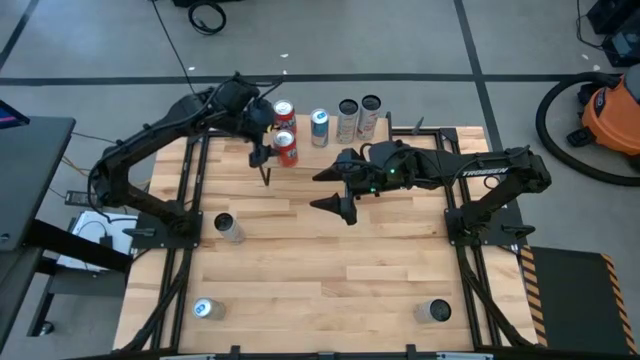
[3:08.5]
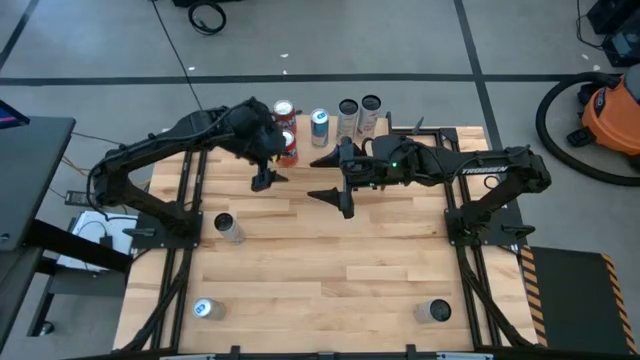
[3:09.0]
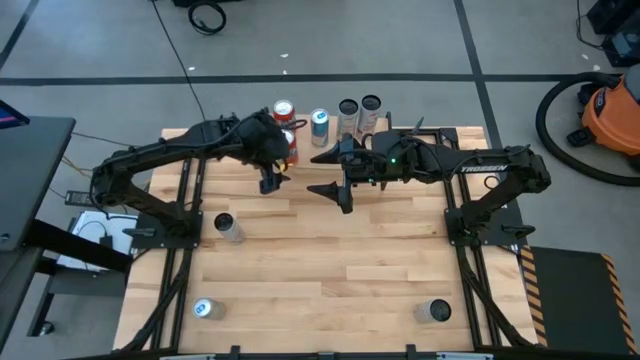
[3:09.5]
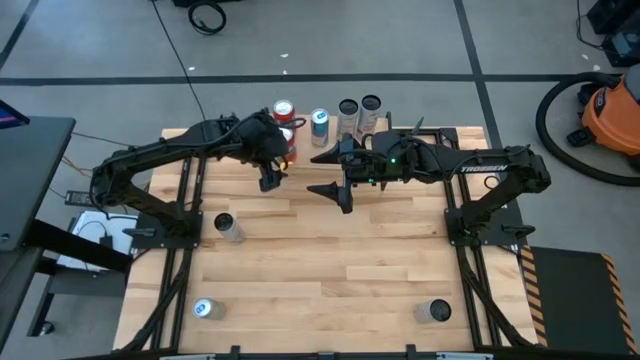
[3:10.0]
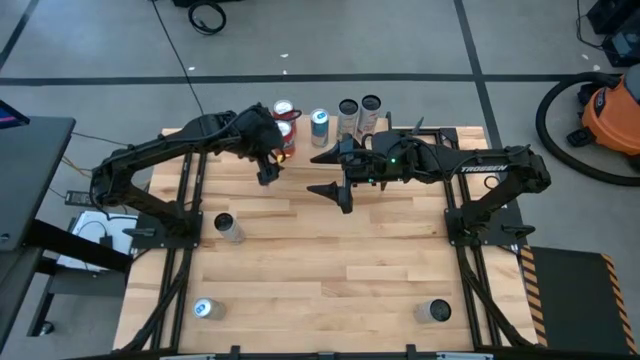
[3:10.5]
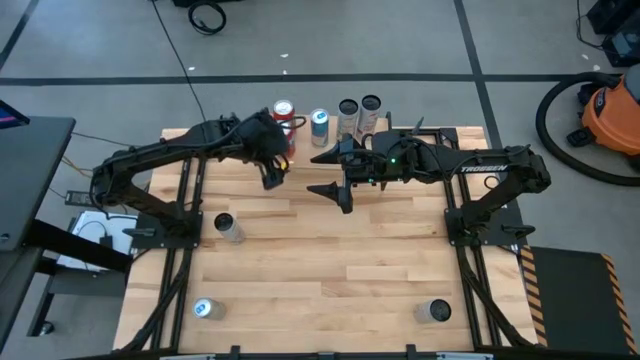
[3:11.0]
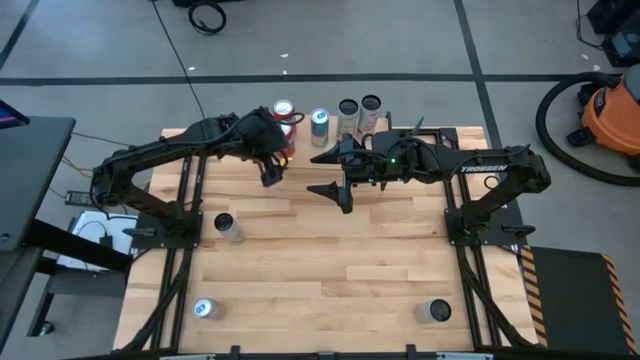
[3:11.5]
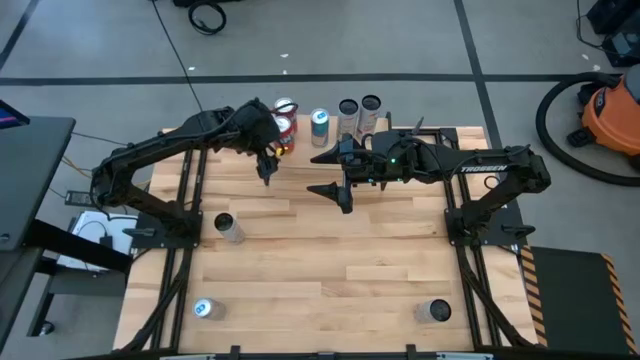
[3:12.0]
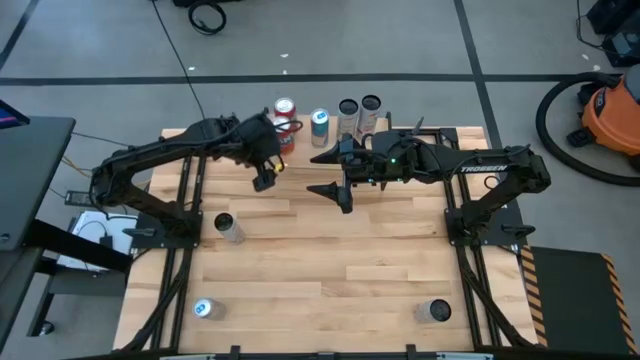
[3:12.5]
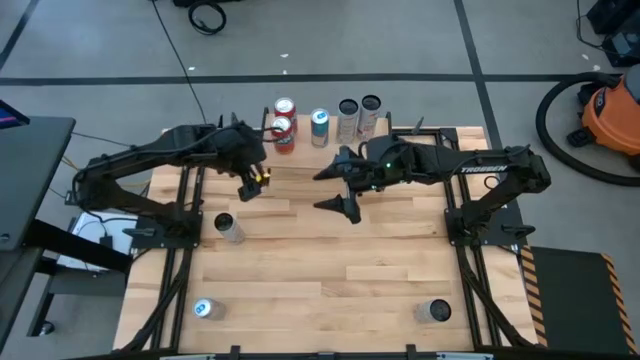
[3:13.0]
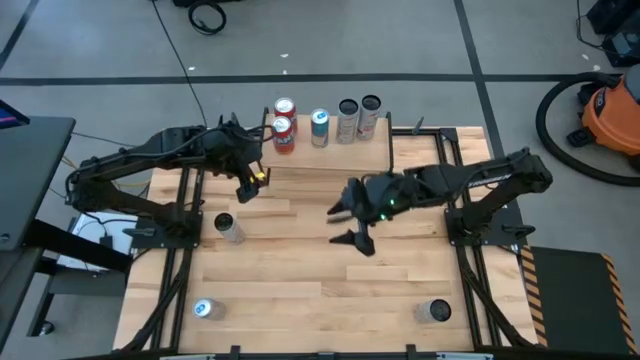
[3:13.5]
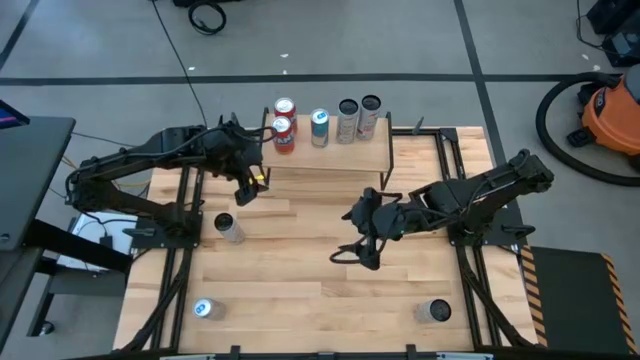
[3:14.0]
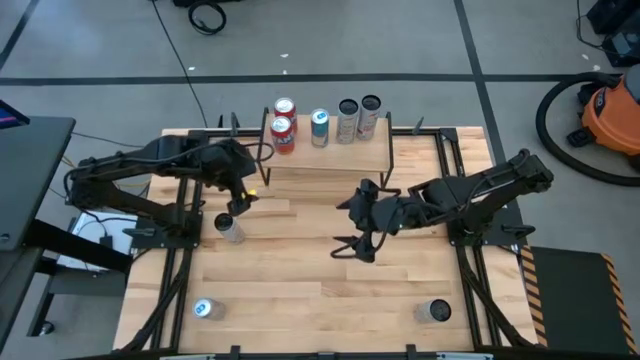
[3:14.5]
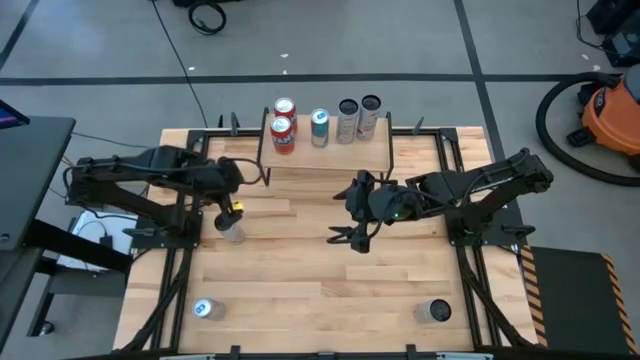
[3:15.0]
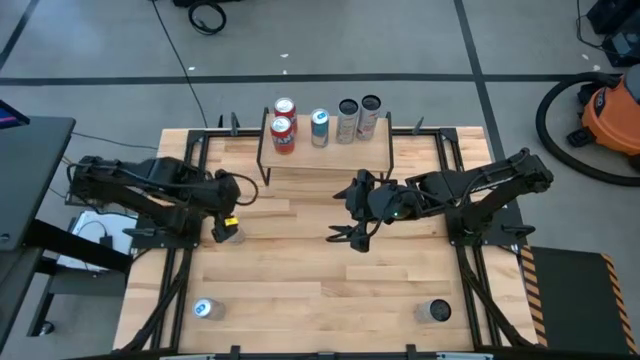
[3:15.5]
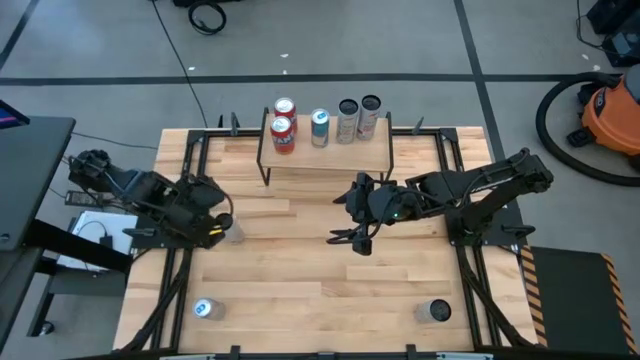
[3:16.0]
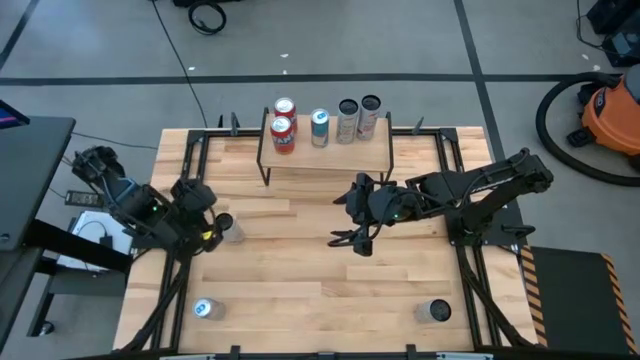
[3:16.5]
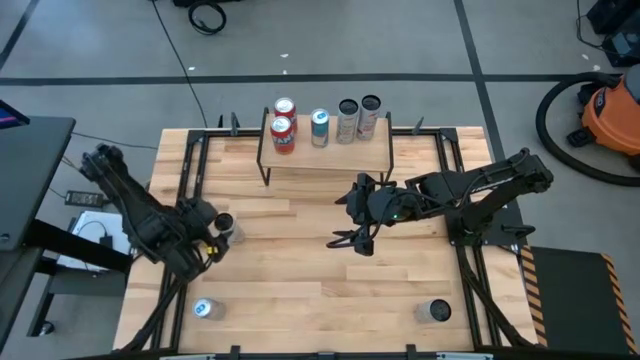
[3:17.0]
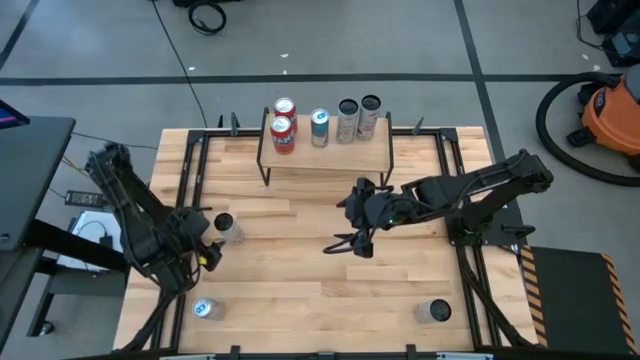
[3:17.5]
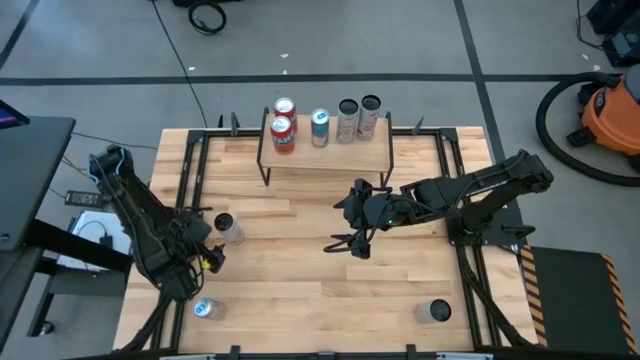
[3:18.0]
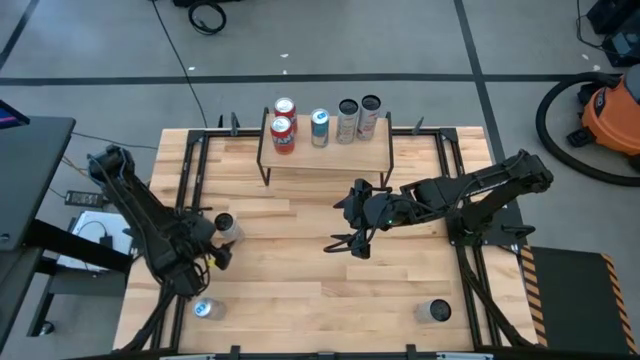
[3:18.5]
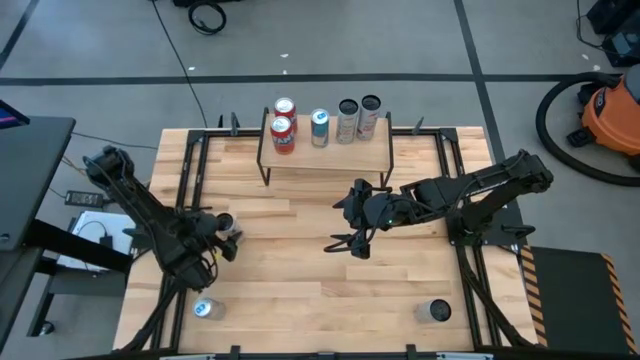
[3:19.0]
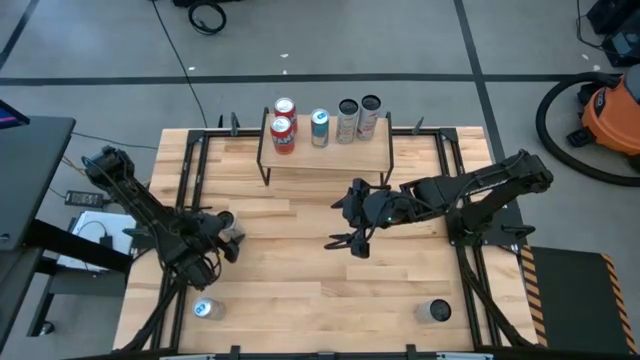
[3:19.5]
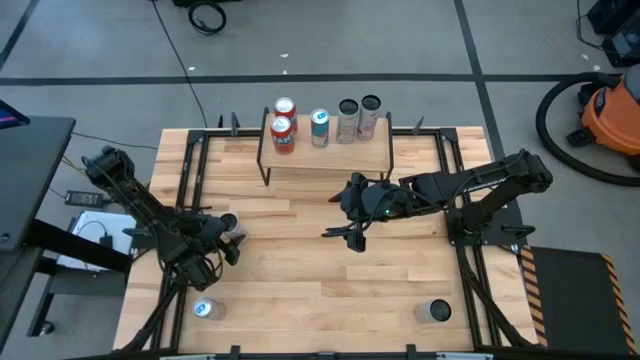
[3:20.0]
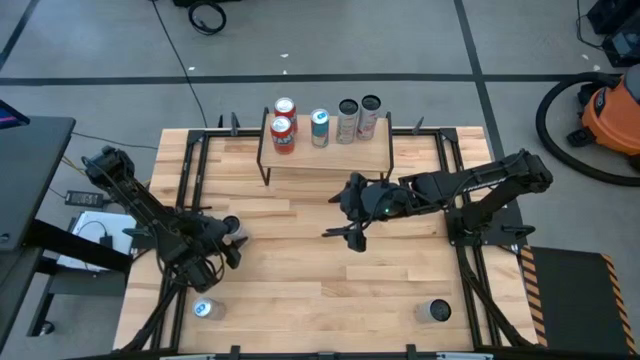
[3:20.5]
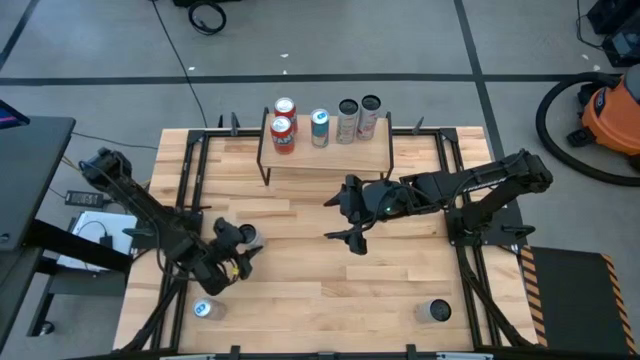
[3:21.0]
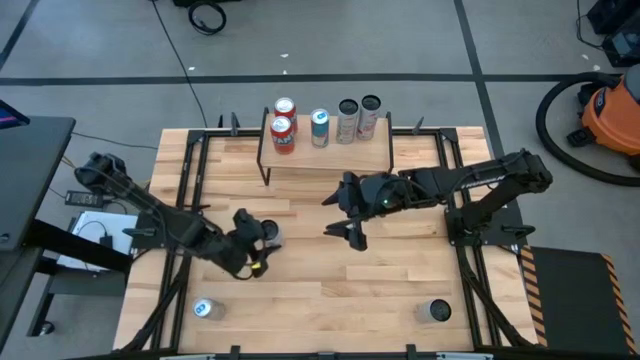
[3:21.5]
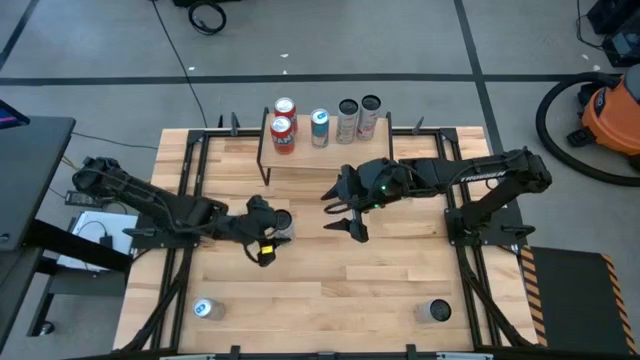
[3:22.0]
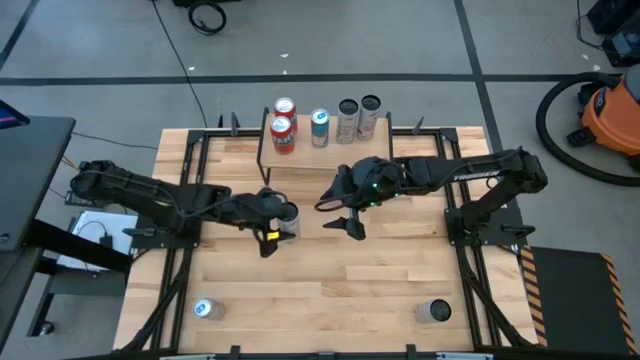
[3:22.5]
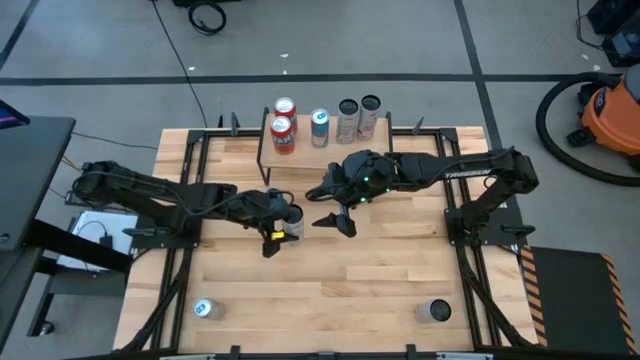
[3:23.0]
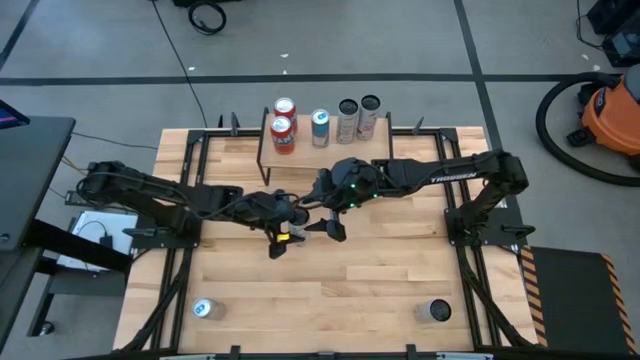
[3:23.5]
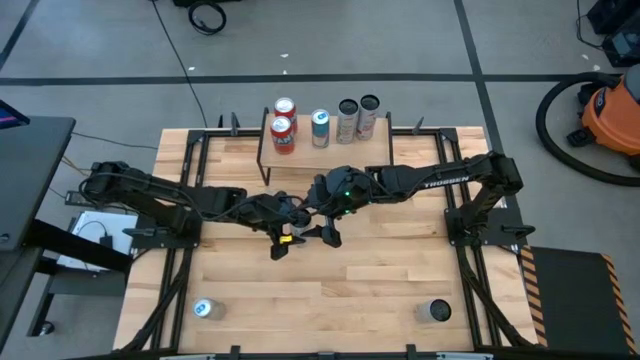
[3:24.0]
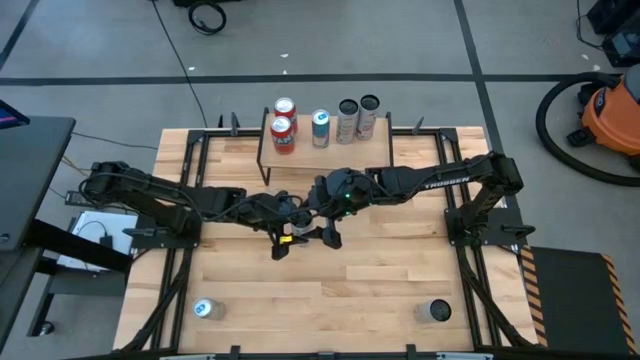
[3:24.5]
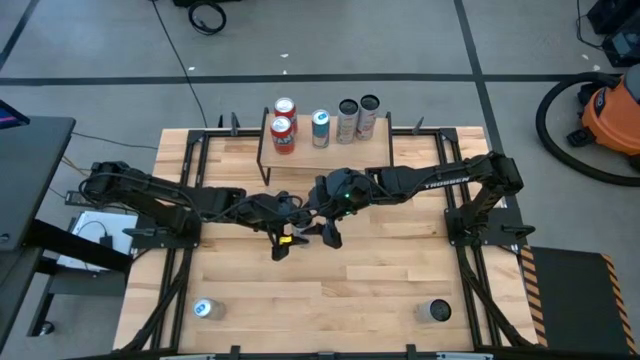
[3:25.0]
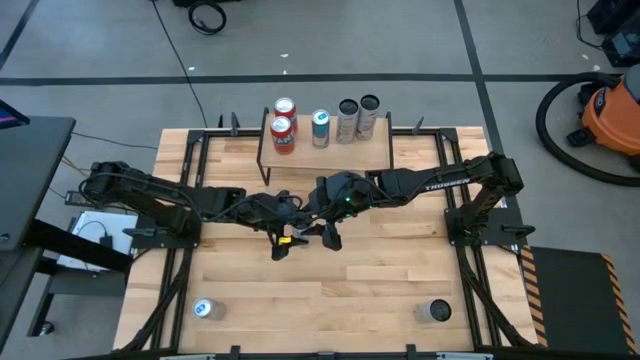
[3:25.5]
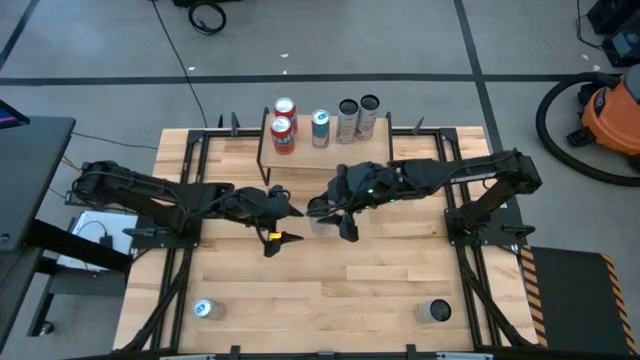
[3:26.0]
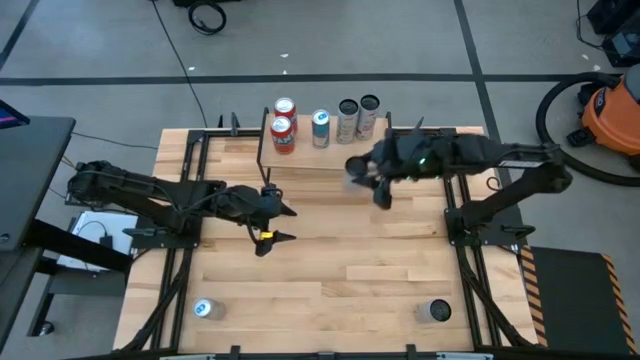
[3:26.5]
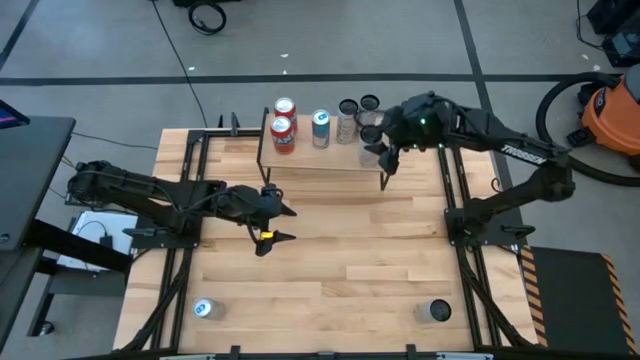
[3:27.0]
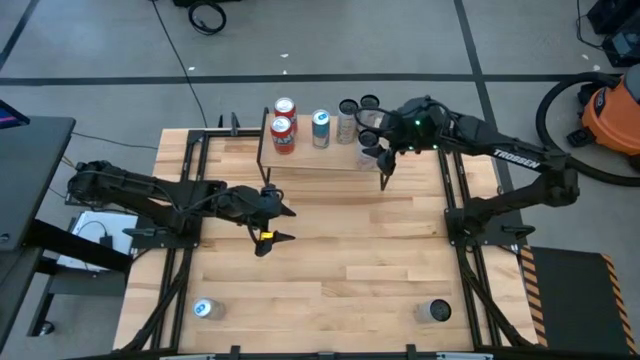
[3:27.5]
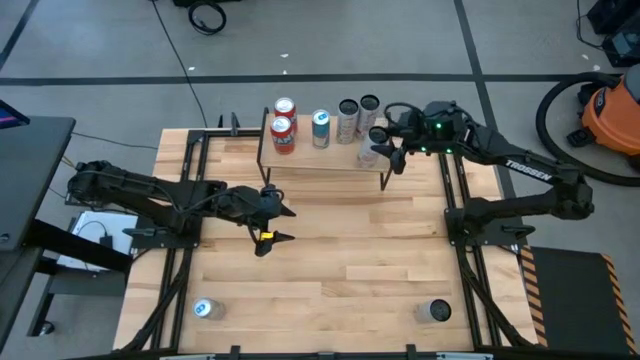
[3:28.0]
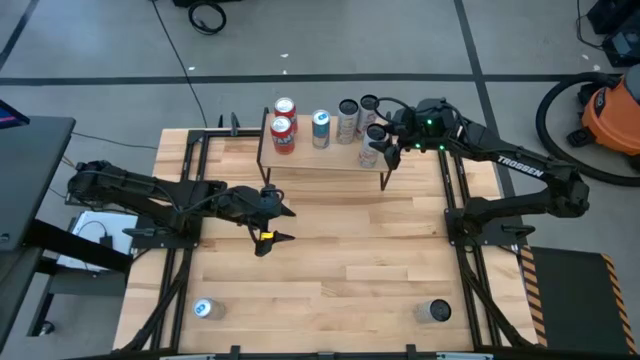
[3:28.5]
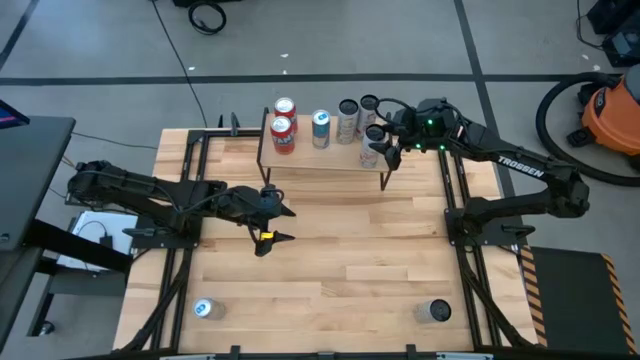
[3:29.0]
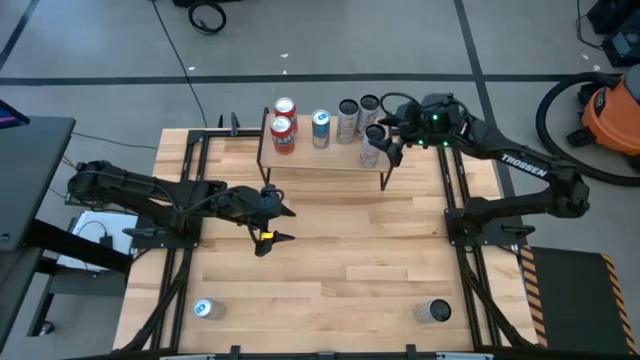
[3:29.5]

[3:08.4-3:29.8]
Task: Place canned beverage on shelf
Put the left red soda can on the shelf
